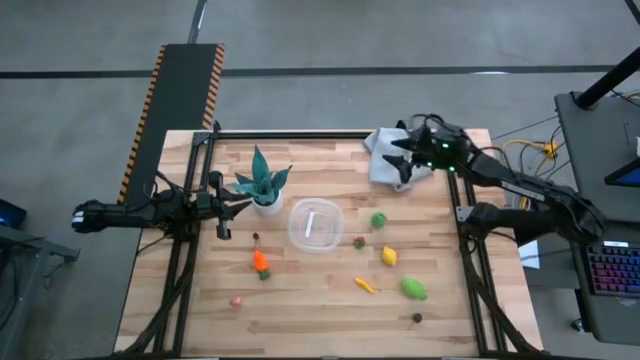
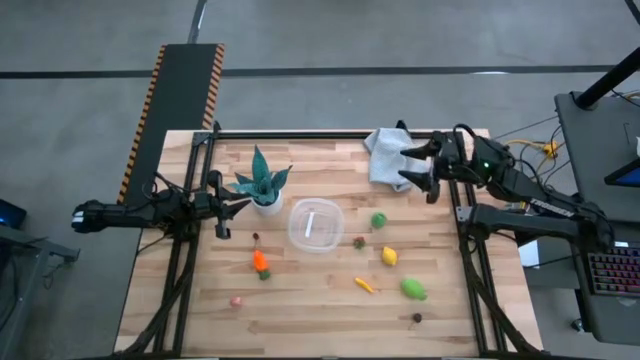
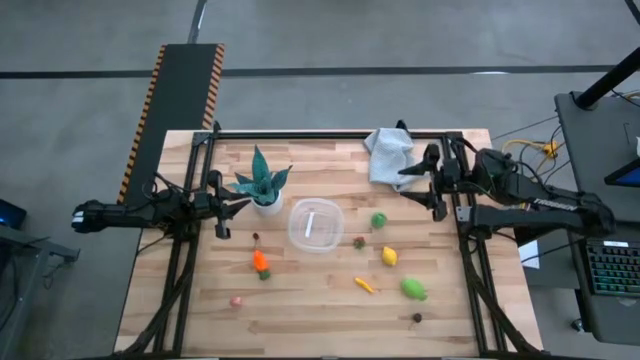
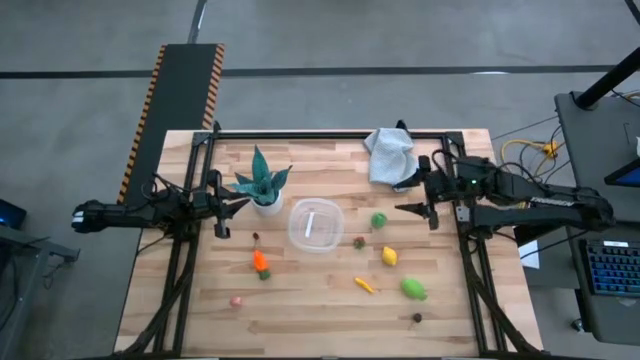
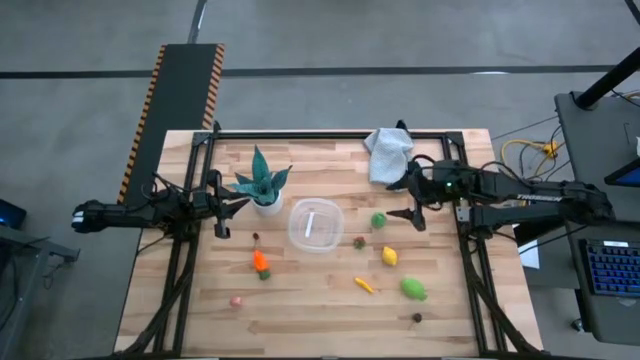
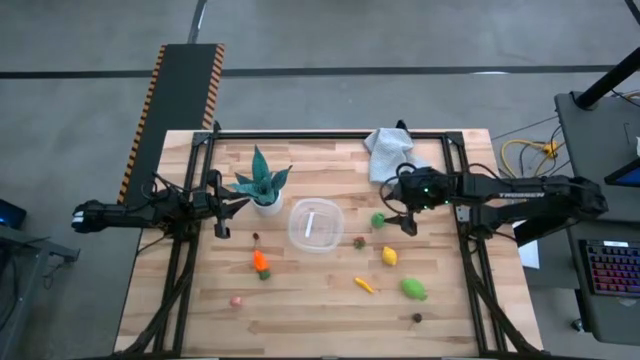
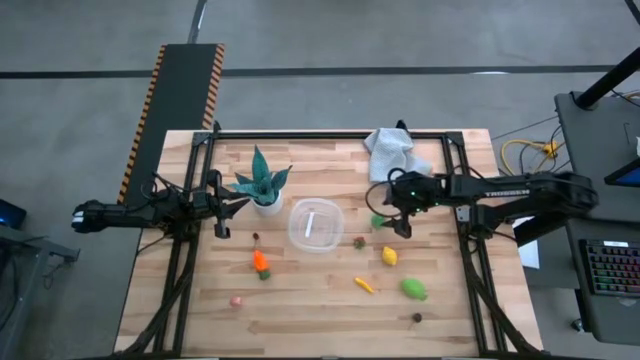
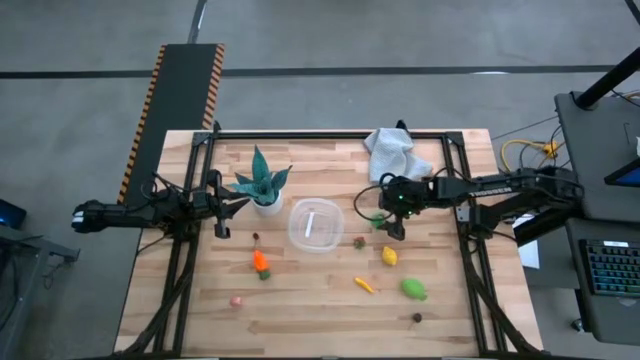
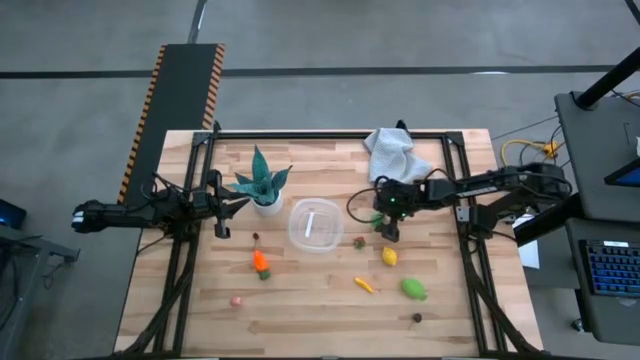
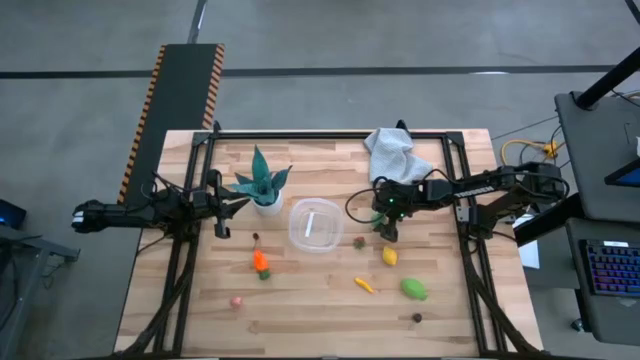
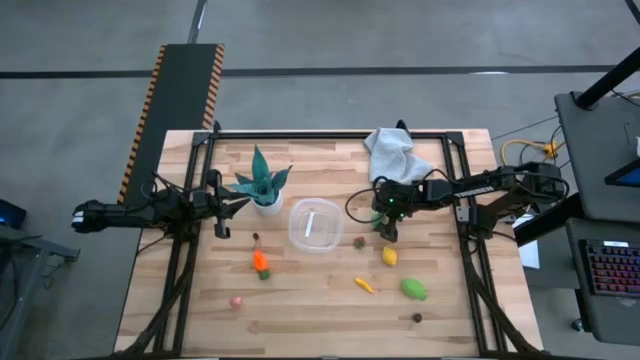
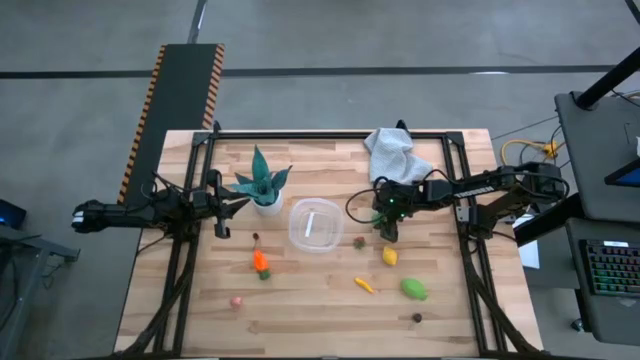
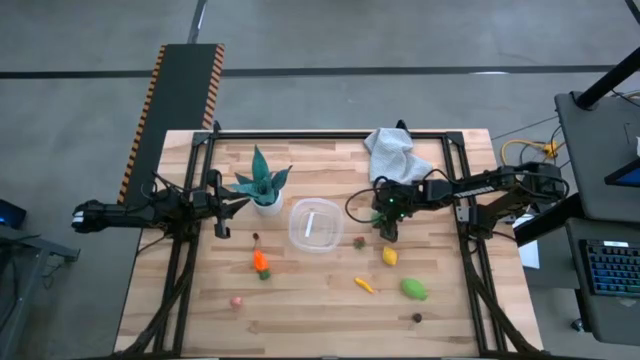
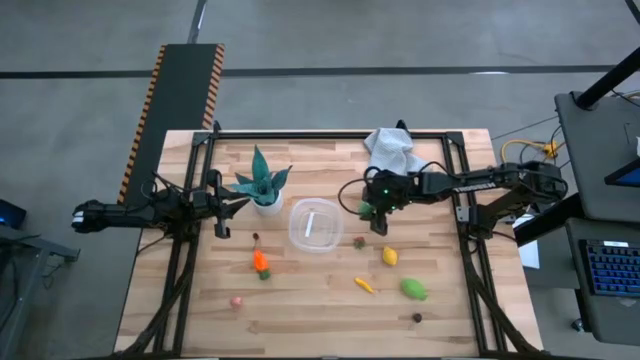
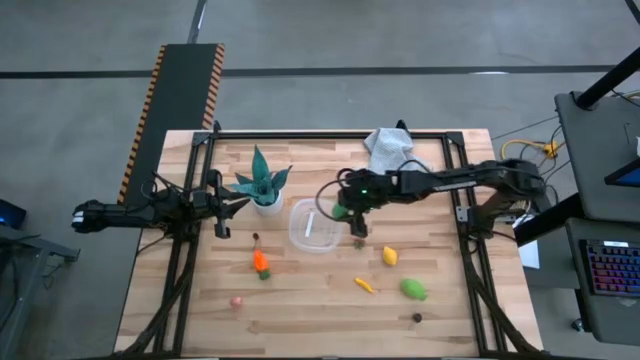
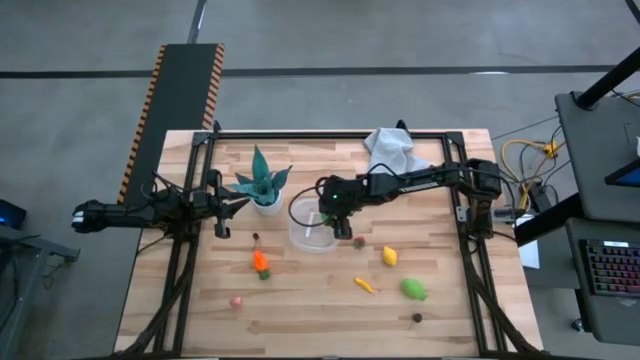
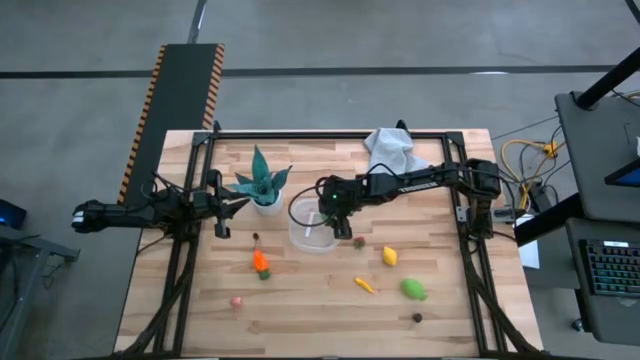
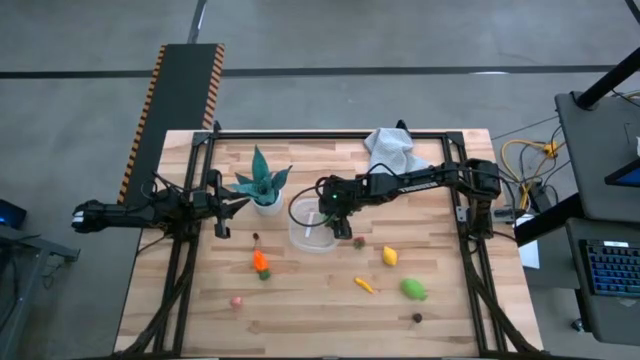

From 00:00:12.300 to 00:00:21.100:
Task: Pick and placing Produce into tupperware
Put the green corn into the container

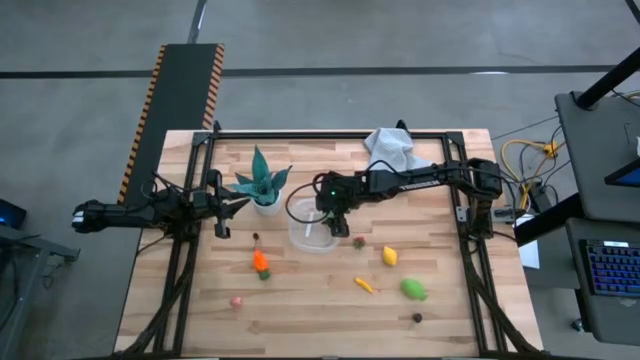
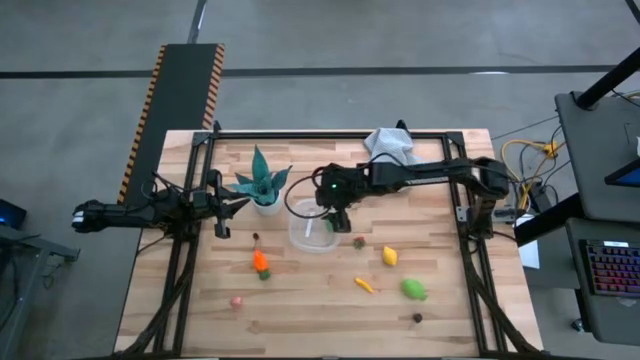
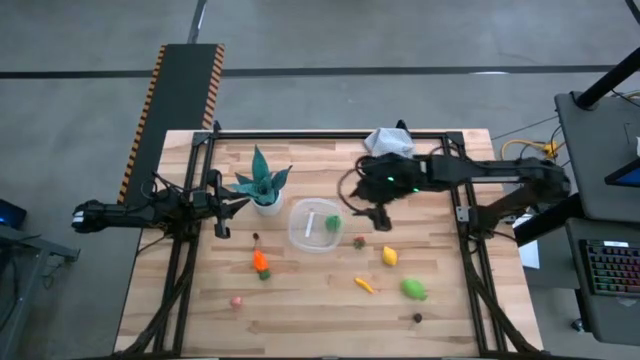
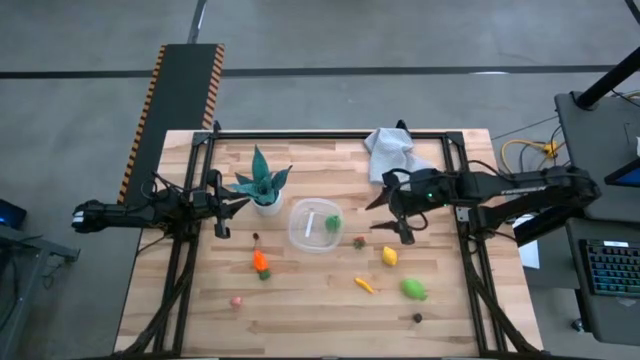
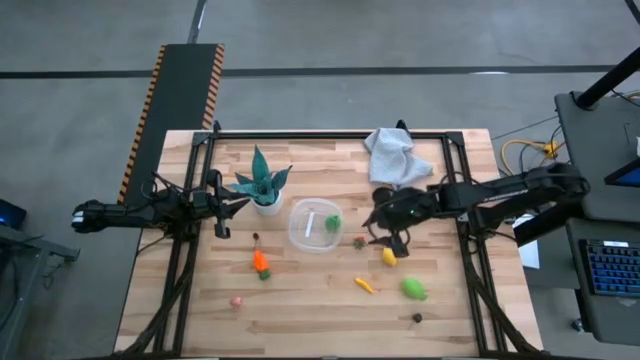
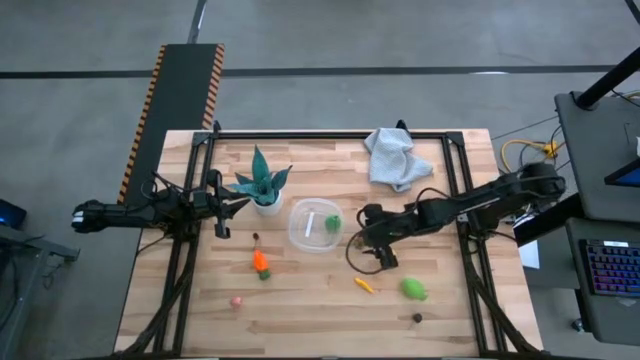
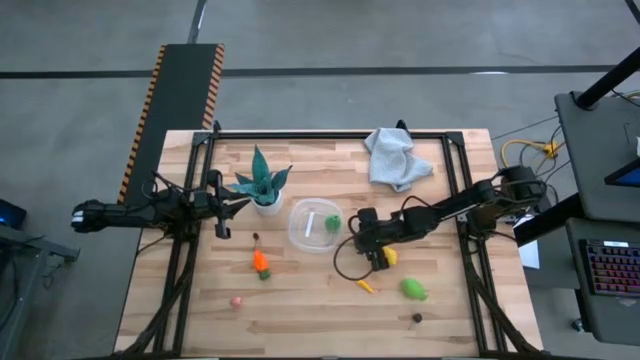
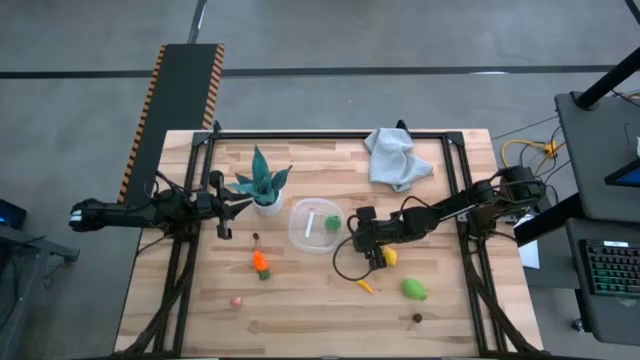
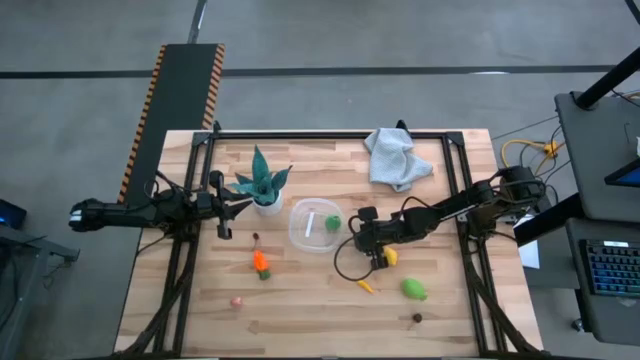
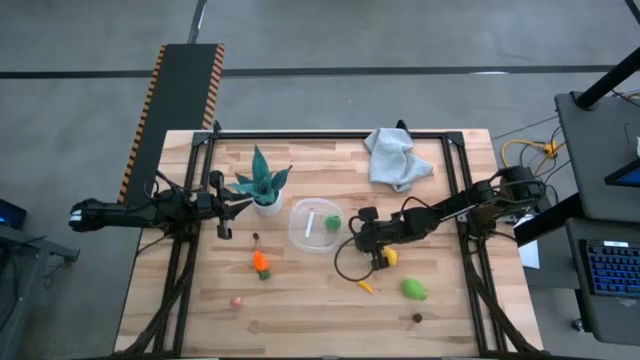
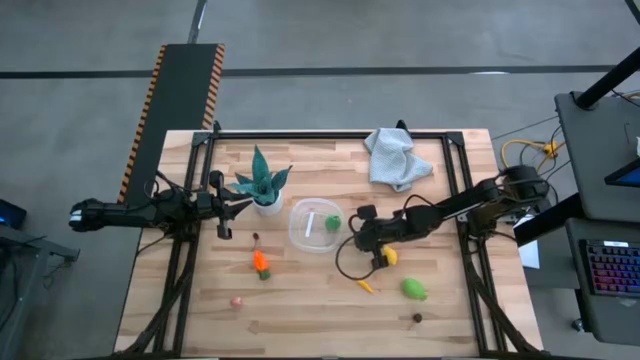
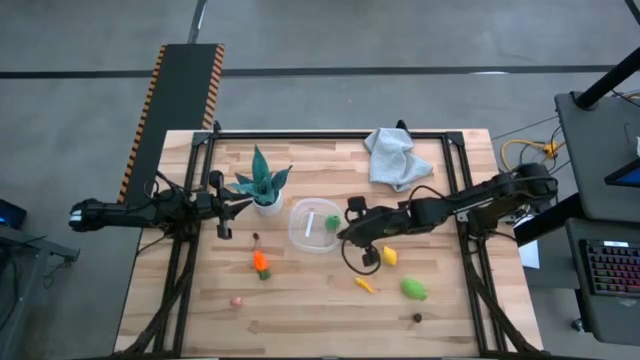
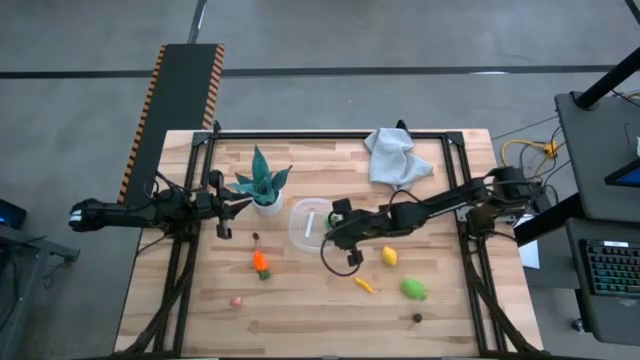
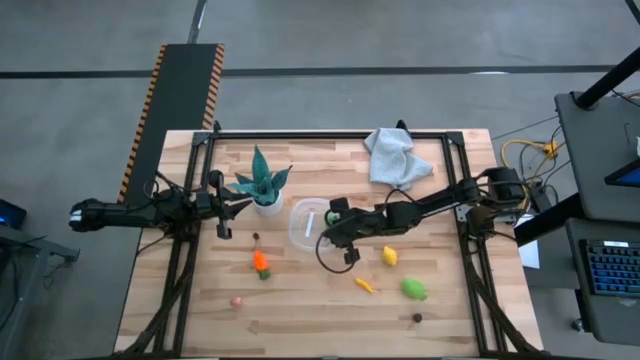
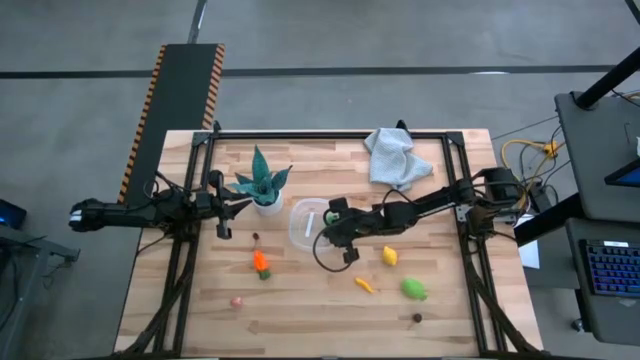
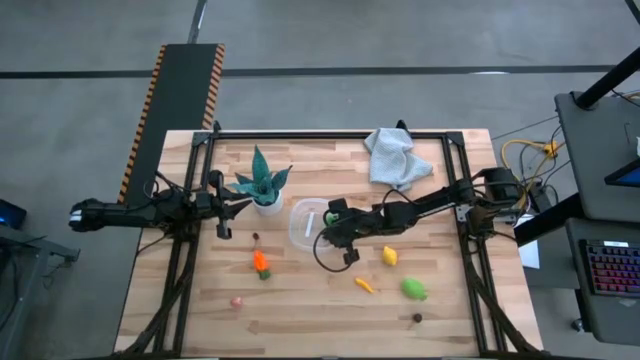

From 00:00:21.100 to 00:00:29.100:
Put the red strawberry into the container

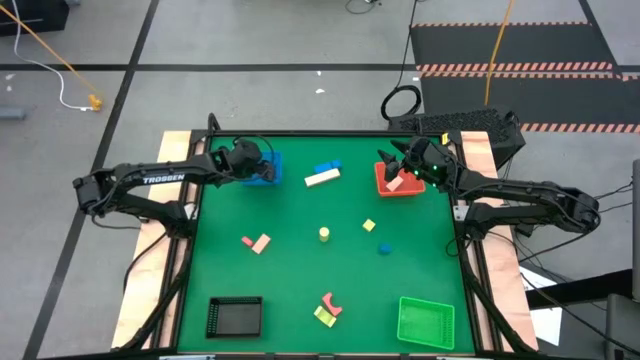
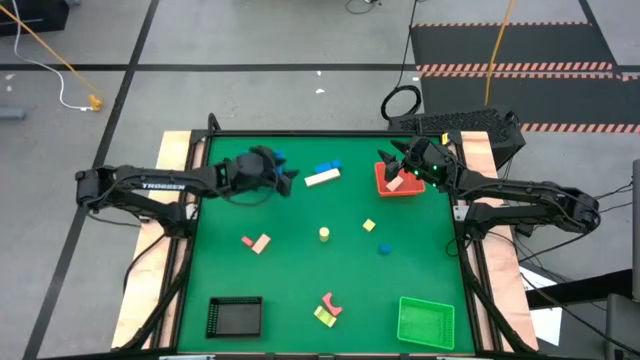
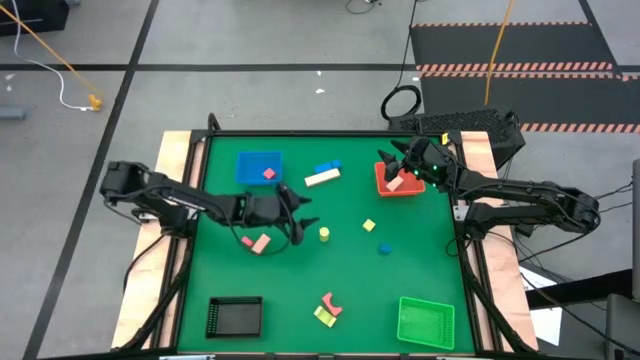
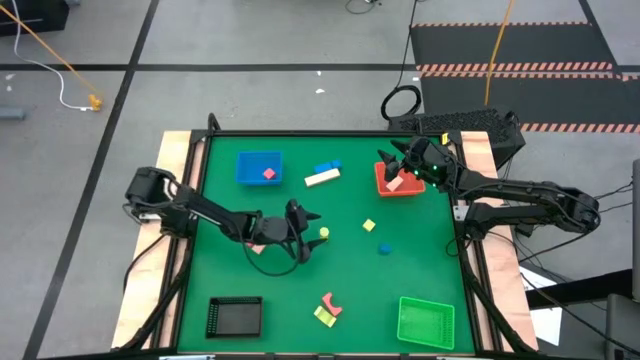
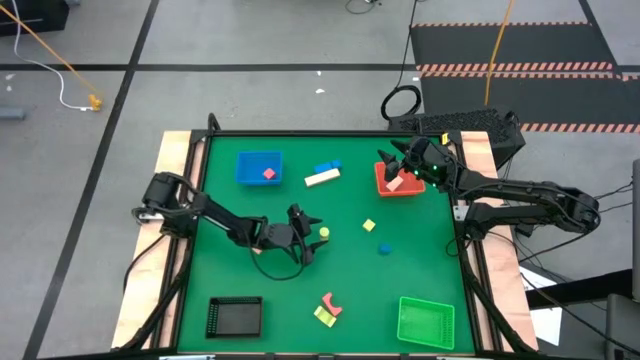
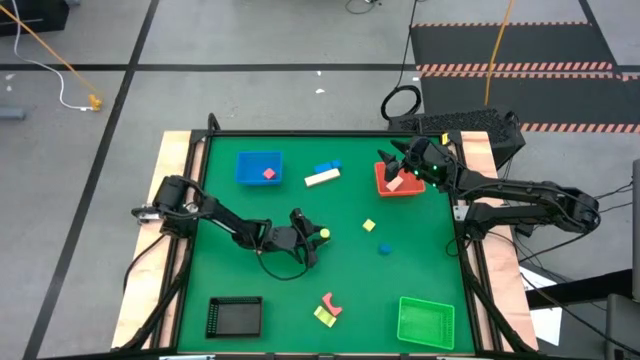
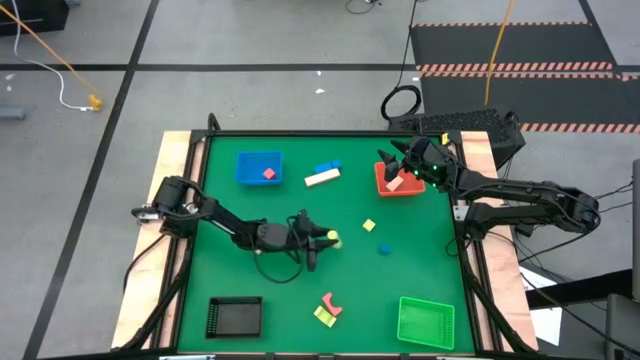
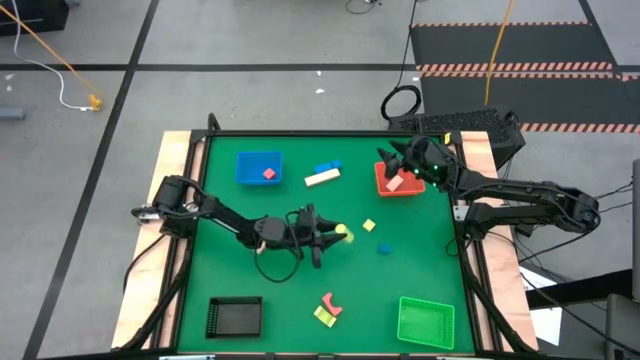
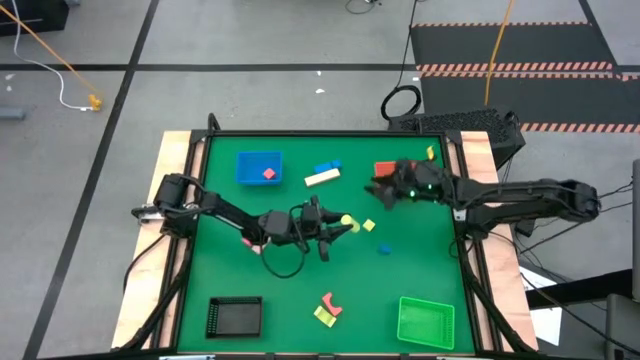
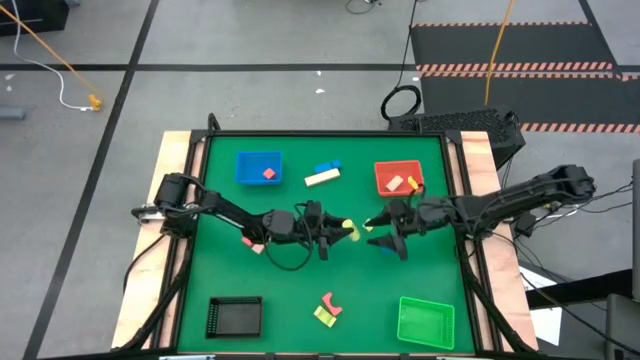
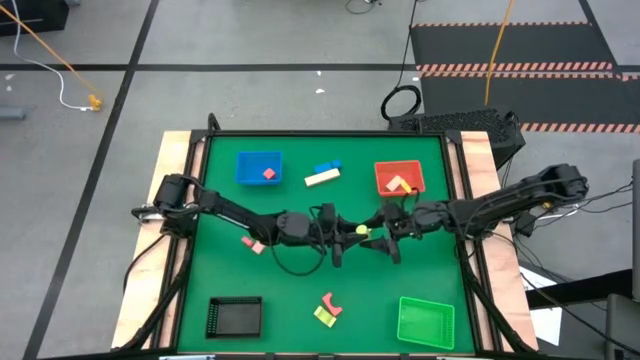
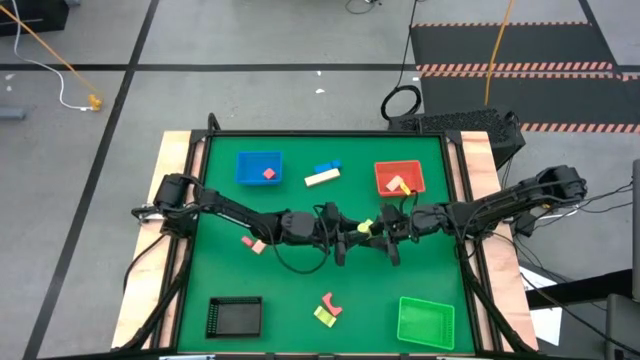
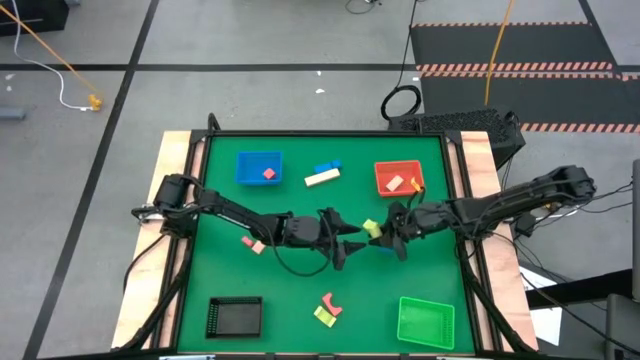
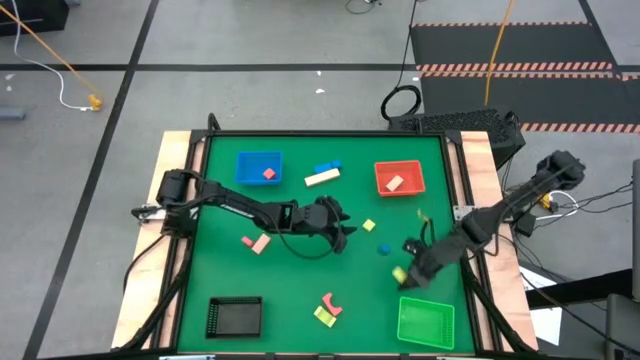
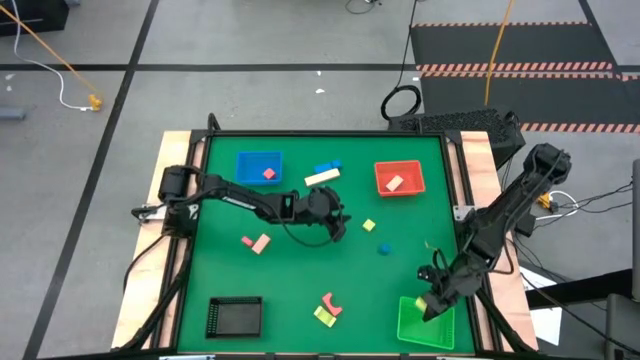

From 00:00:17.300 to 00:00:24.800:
Task: Sort & place blocks by color
Put the top left green block in the green basket
